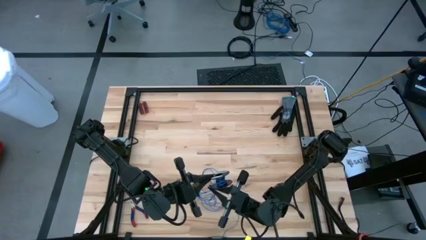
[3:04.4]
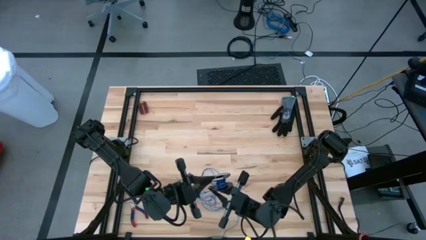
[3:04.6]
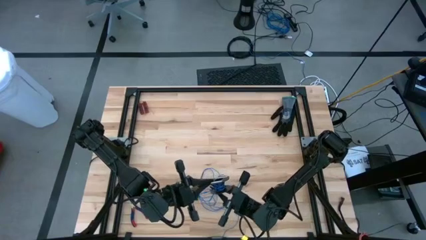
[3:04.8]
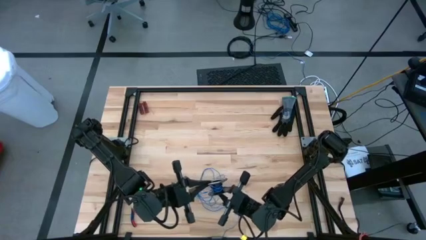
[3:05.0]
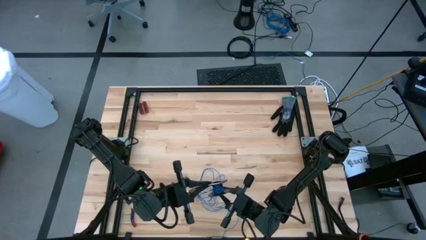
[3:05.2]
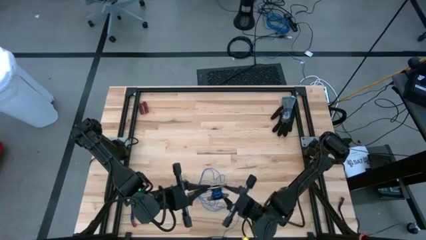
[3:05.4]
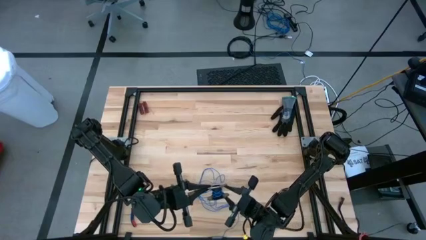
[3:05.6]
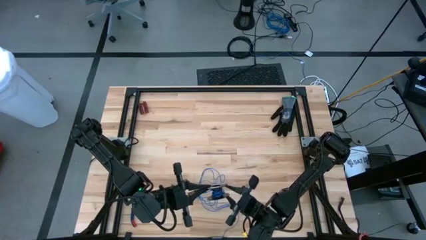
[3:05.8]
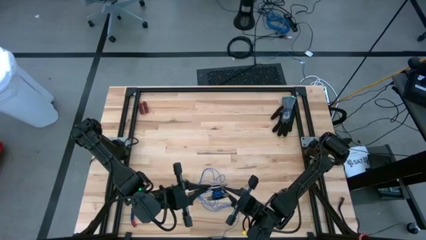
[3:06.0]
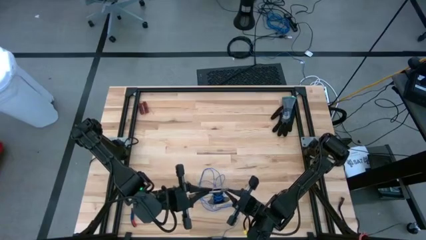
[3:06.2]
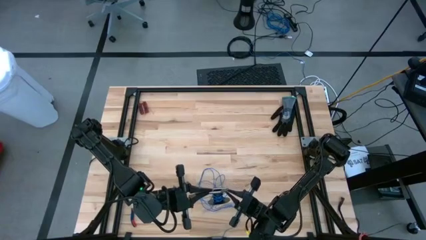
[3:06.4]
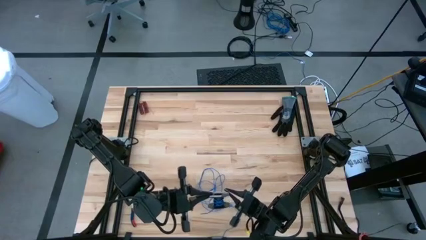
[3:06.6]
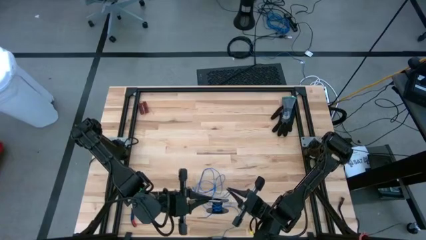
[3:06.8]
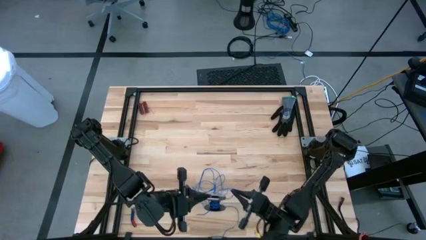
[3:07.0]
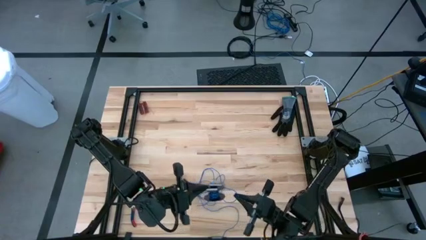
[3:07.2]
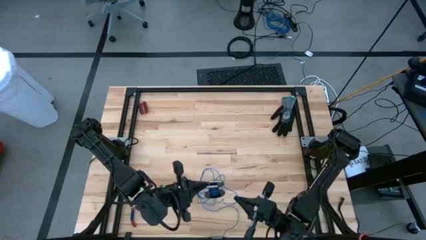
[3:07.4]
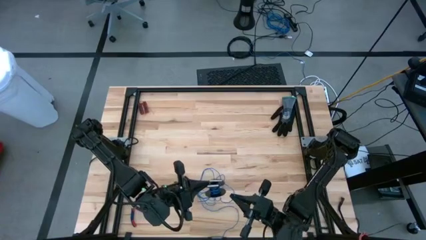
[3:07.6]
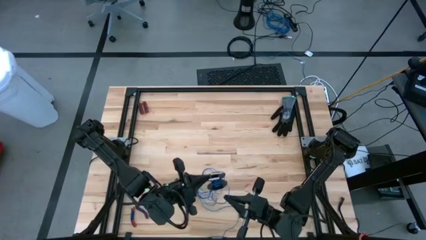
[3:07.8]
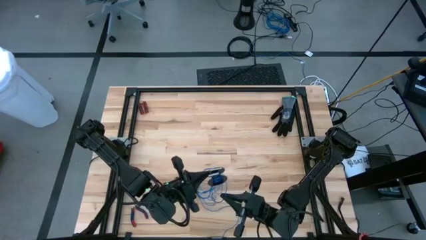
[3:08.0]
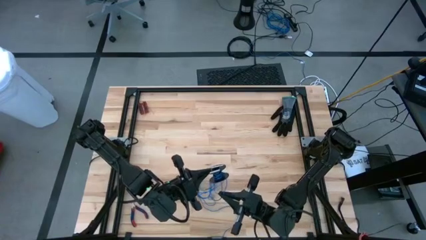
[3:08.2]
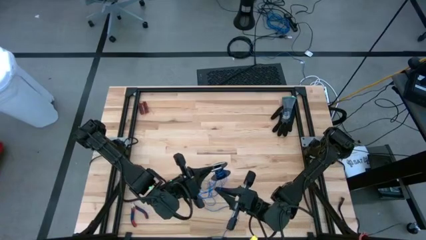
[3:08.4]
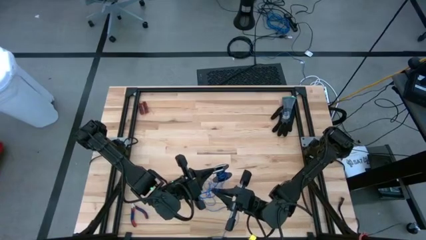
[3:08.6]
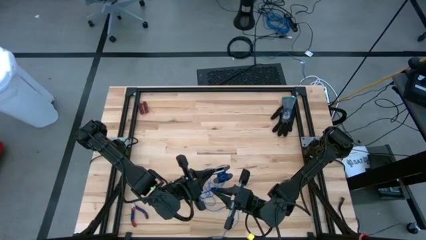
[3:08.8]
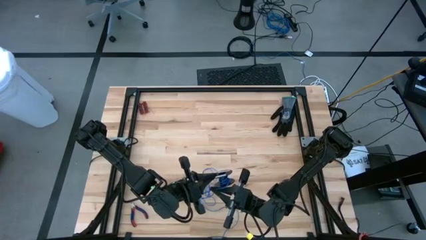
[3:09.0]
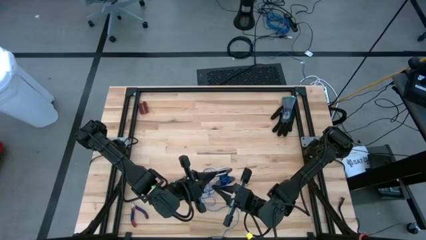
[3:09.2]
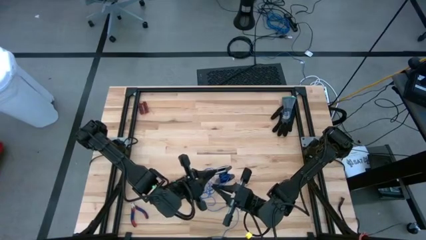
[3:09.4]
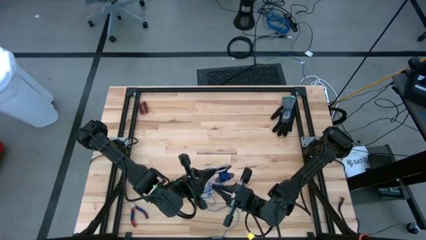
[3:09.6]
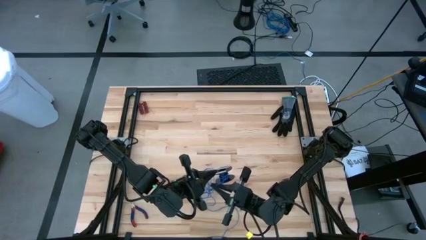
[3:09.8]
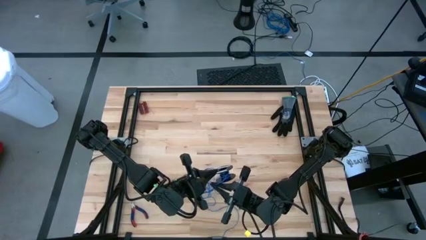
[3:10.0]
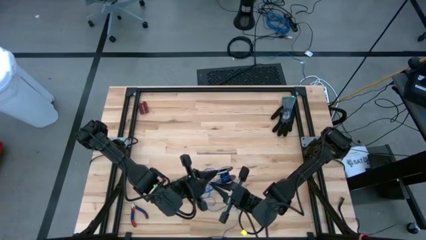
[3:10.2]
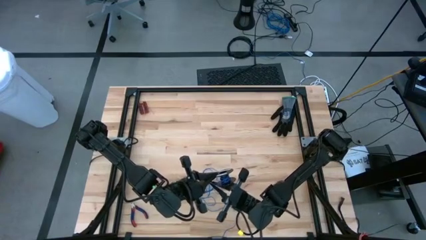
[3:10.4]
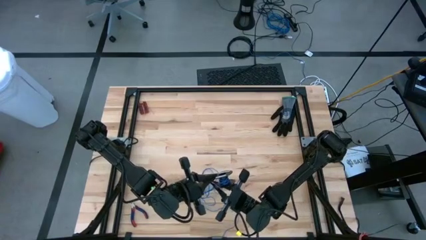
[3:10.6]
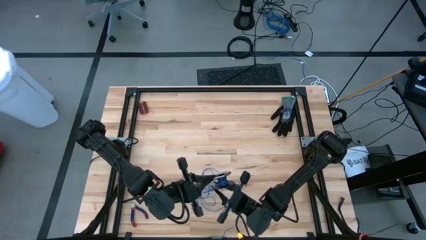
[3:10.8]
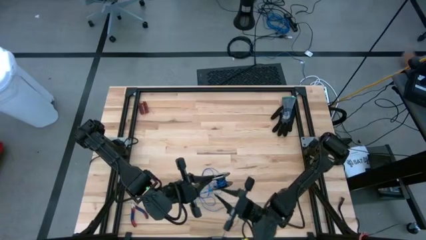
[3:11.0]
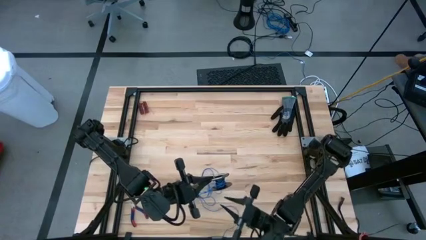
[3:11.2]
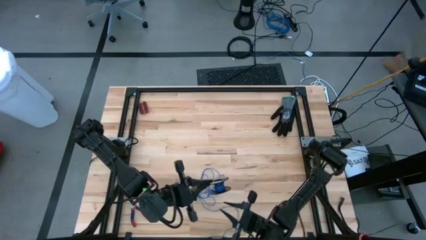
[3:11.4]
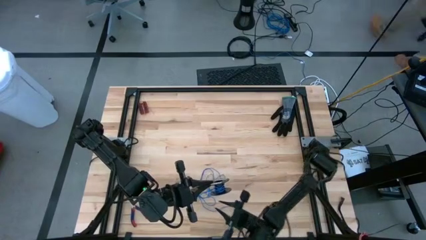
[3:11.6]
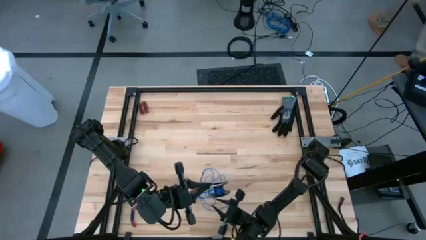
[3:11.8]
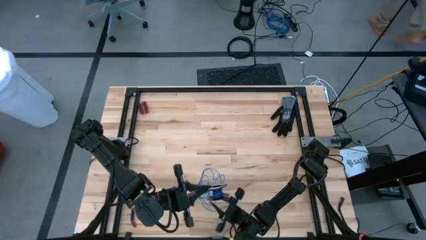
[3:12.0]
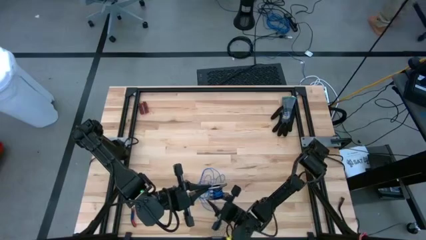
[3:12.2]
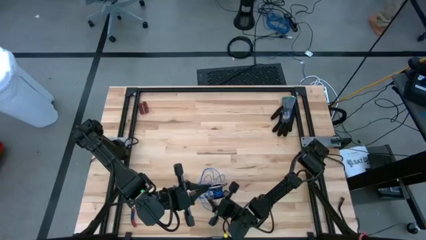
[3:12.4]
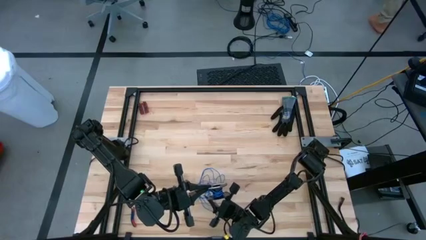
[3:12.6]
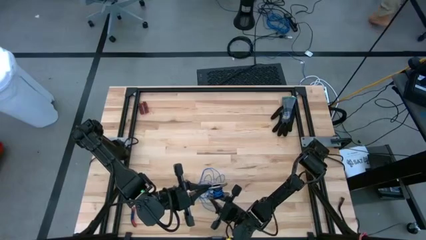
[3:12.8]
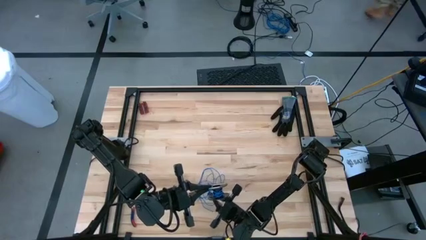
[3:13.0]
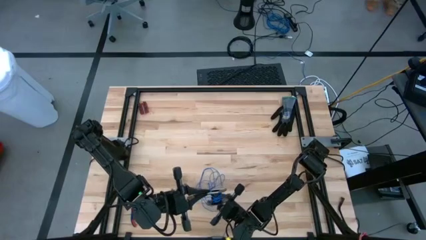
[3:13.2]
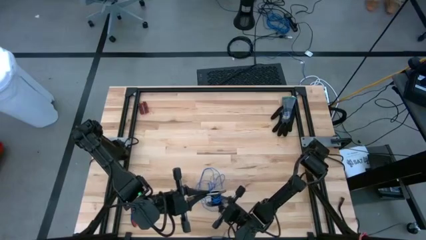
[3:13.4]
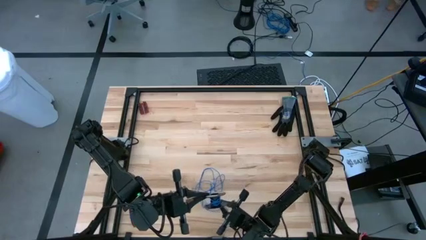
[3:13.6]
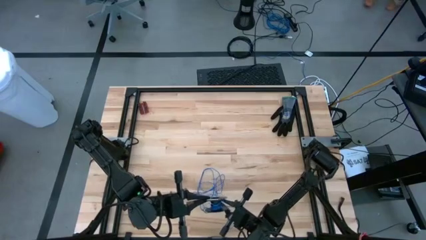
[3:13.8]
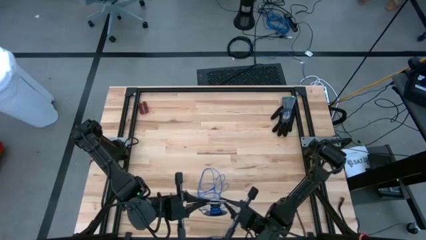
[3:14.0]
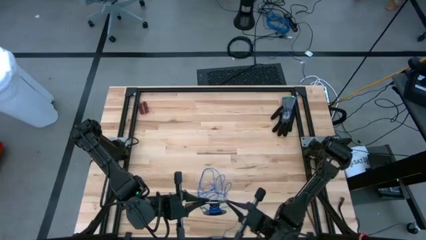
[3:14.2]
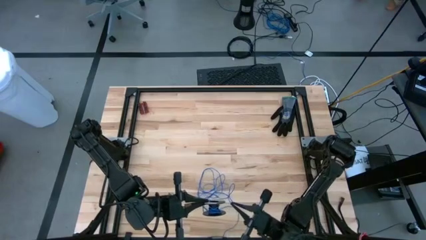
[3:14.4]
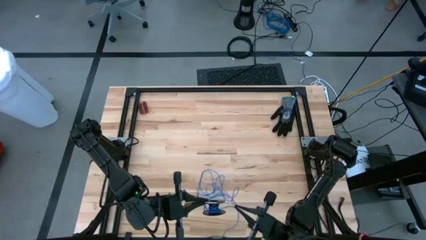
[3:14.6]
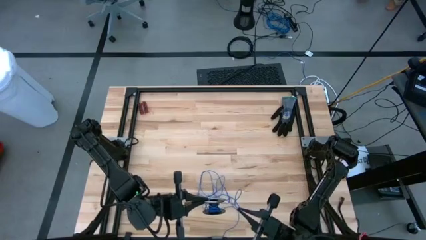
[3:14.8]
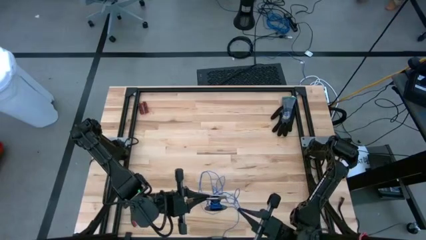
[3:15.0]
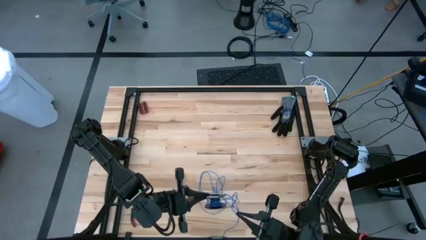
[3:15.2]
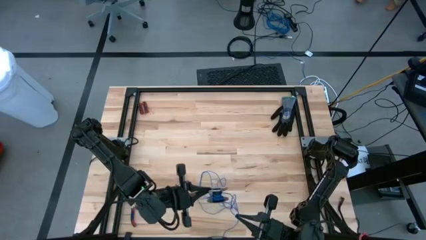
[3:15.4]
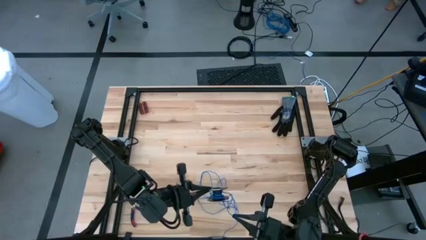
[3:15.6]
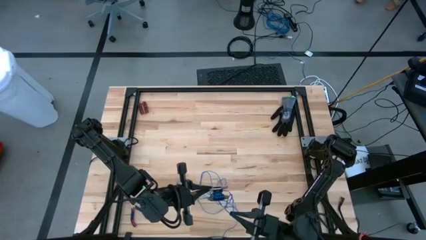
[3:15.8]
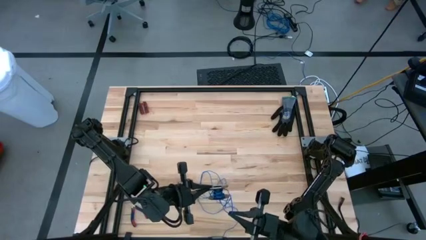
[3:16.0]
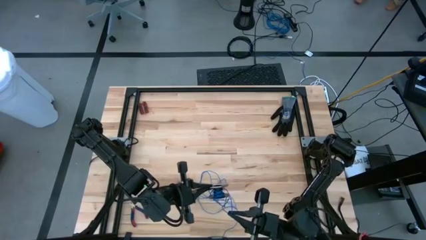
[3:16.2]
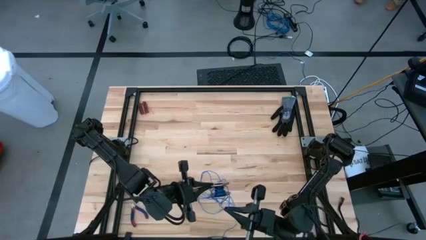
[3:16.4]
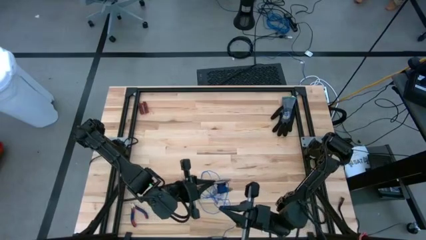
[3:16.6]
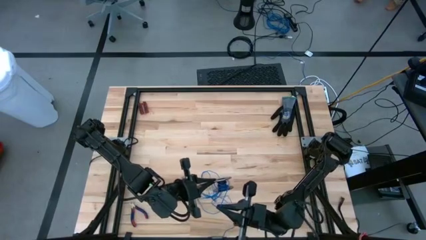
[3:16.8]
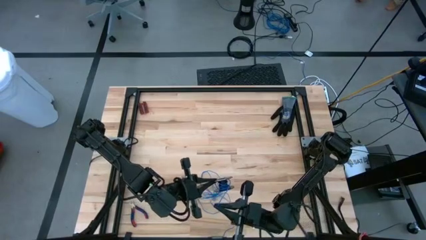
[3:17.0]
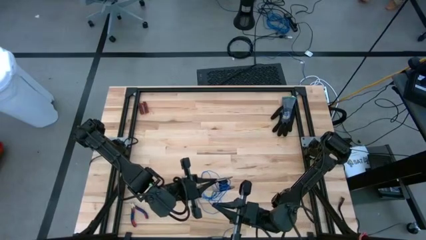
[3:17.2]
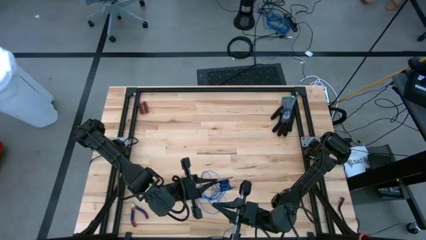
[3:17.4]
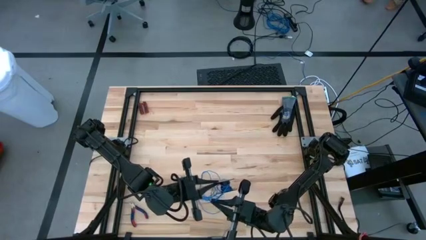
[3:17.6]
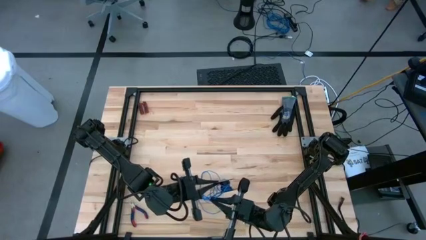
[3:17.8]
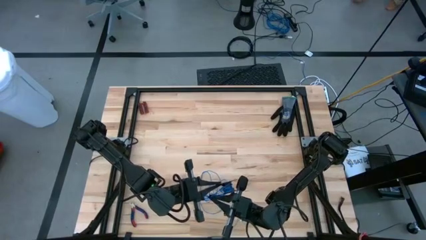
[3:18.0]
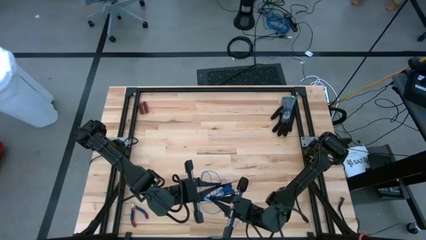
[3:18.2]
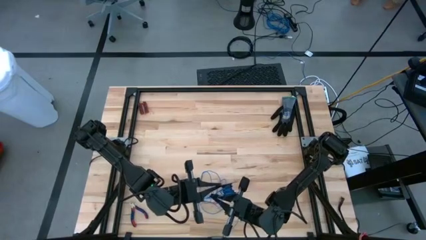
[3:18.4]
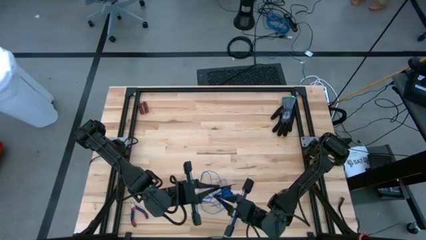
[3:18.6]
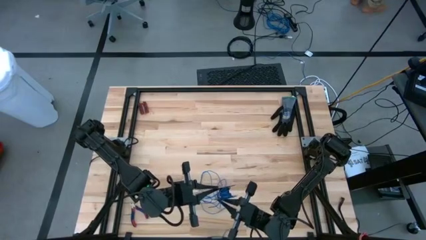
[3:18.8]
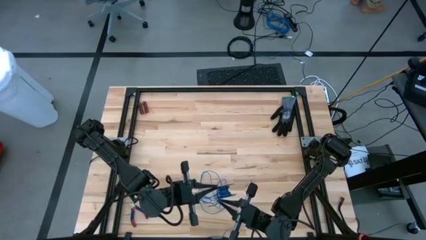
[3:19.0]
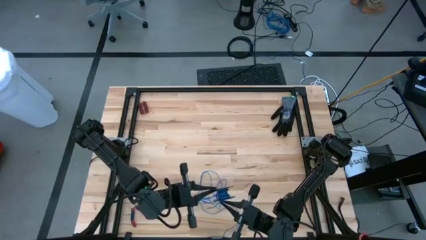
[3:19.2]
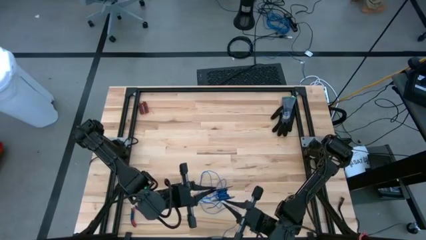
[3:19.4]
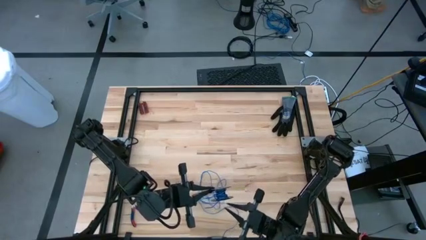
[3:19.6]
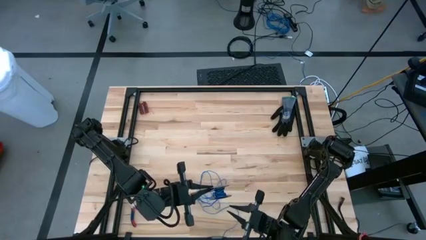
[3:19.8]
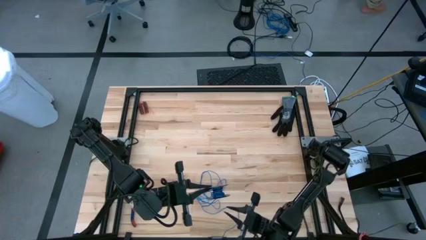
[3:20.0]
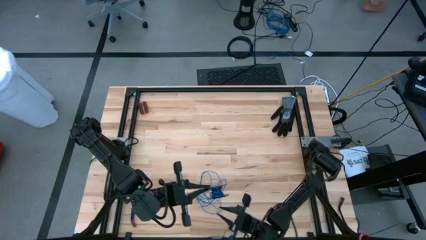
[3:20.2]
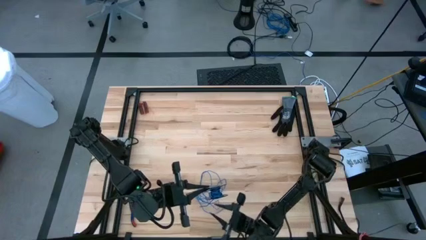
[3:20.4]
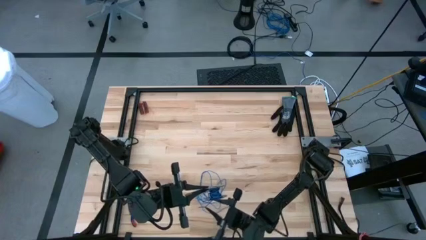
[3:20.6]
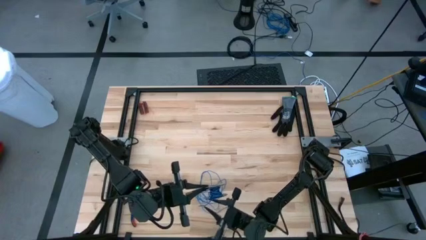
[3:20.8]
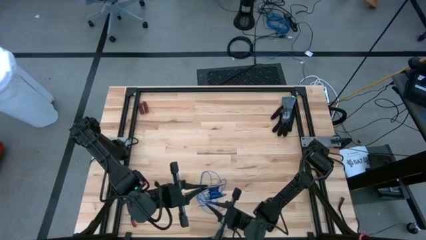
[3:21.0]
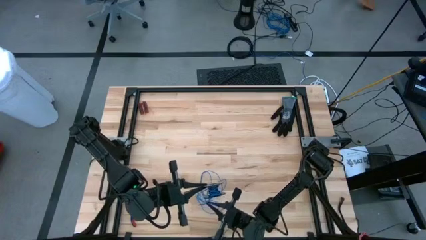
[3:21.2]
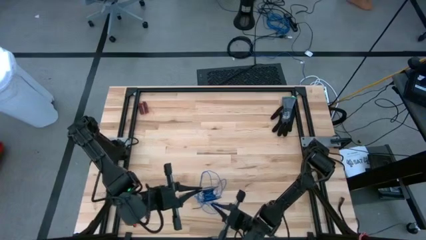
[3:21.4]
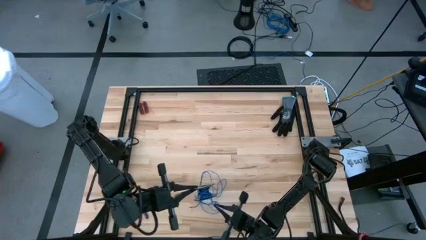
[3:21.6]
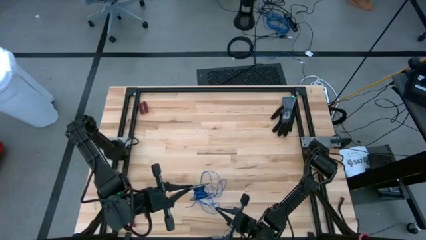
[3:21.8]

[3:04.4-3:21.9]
Task: Coil cords
Coil the blue wire onto a spool
